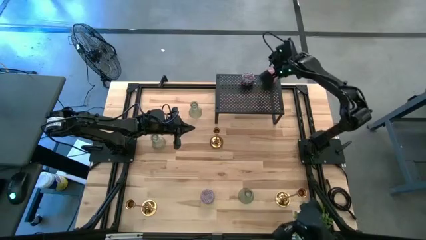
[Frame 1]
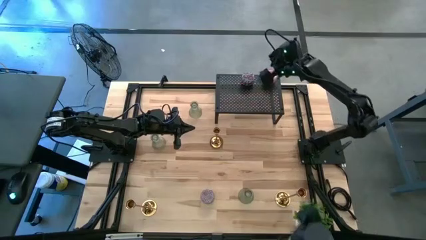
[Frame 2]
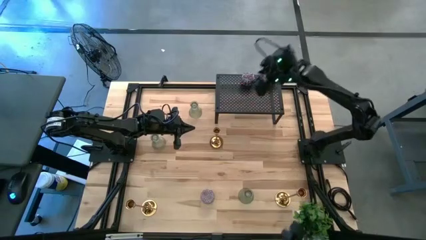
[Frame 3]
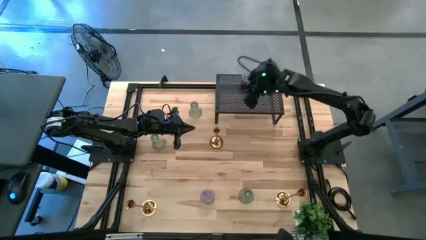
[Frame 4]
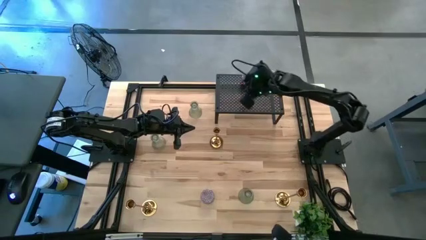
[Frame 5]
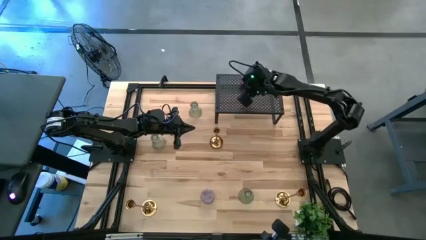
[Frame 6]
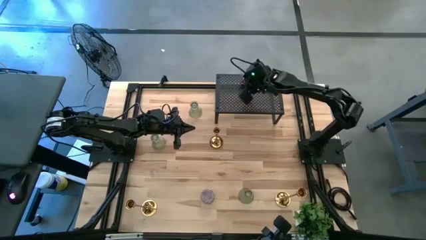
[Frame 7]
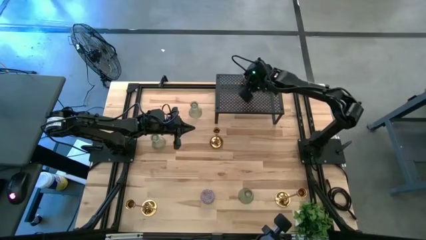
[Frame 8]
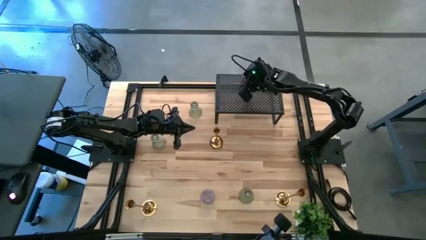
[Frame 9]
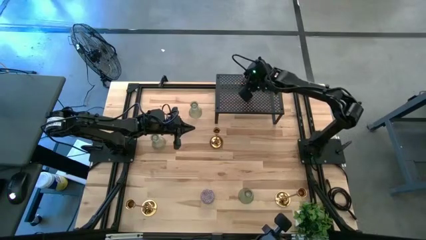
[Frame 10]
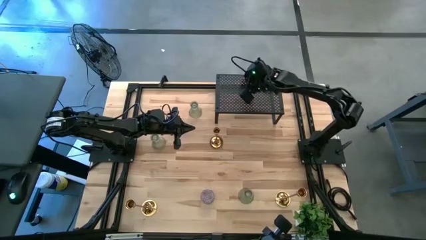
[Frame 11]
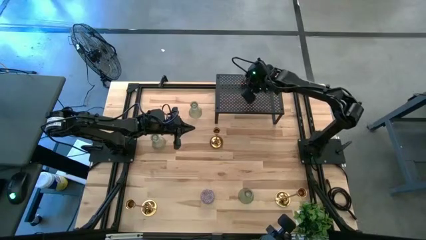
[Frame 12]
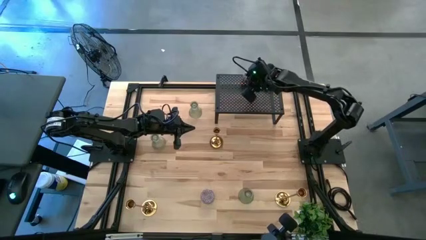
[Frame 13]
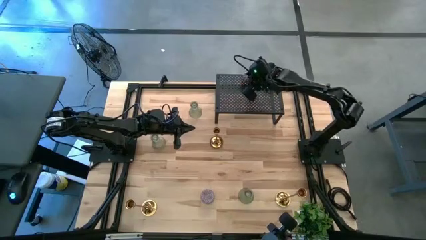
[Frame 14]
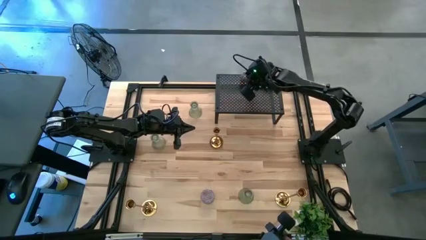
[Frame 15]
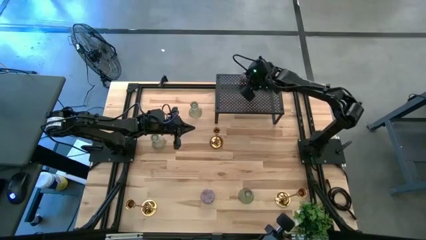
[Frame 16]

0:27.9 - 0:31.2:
Task: Pick & Place candle stick holders
Adjust the black patterned candle

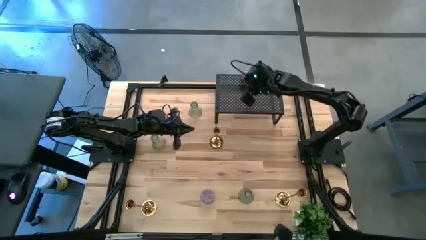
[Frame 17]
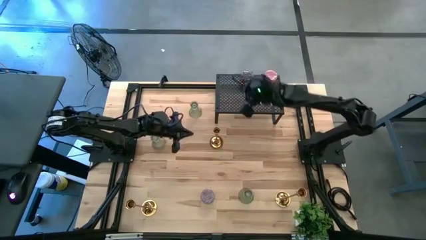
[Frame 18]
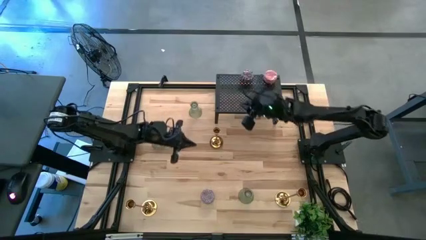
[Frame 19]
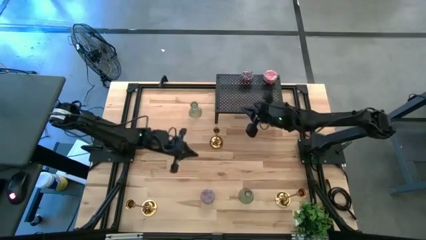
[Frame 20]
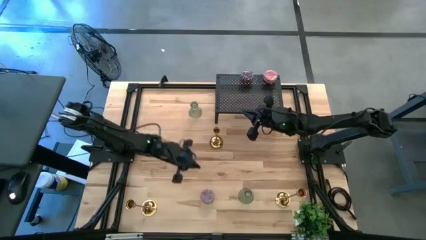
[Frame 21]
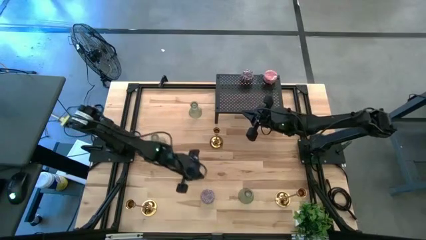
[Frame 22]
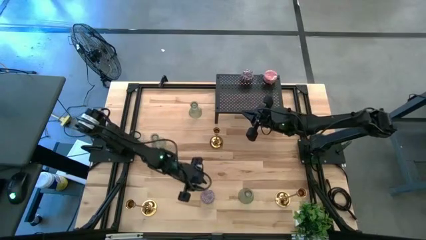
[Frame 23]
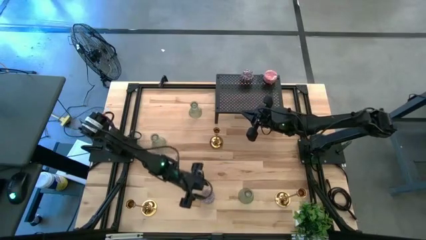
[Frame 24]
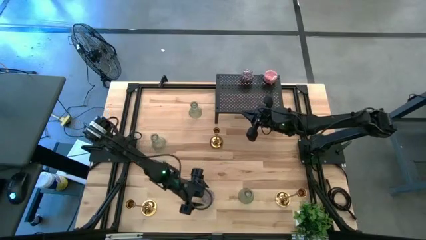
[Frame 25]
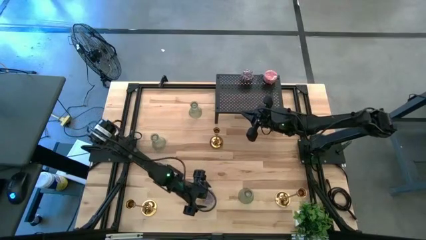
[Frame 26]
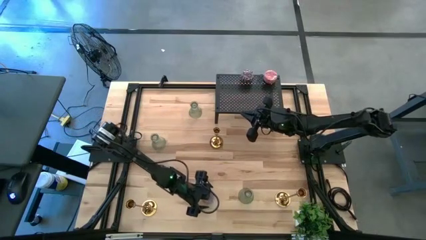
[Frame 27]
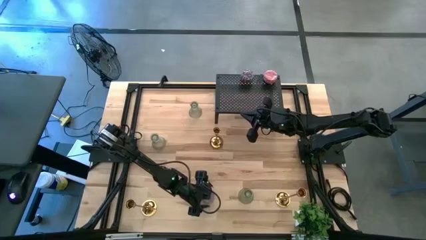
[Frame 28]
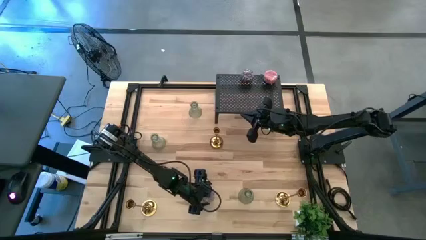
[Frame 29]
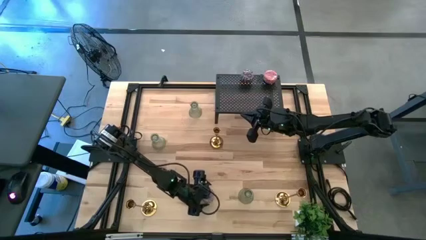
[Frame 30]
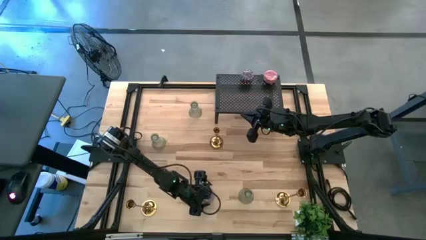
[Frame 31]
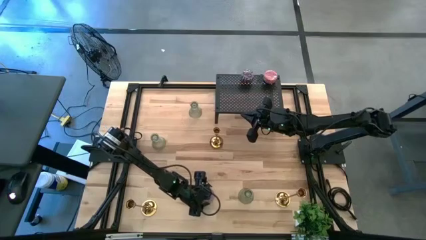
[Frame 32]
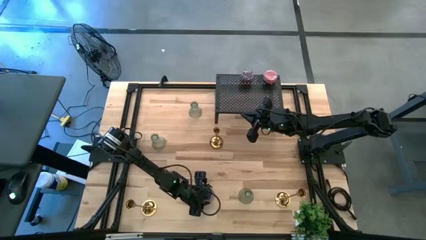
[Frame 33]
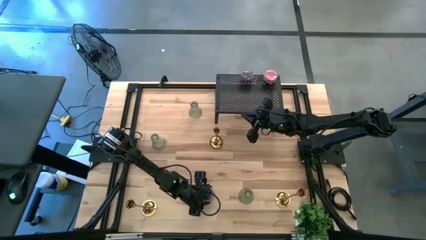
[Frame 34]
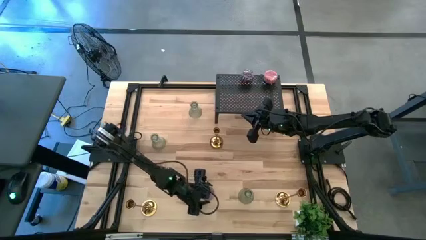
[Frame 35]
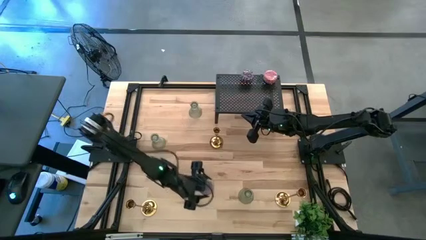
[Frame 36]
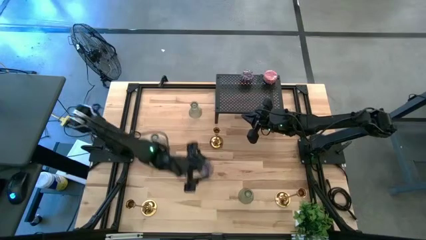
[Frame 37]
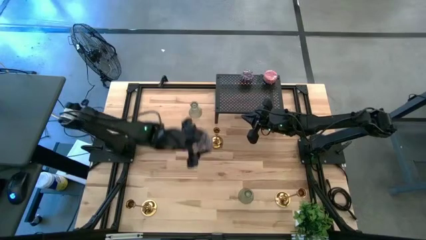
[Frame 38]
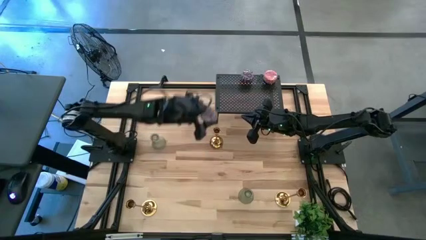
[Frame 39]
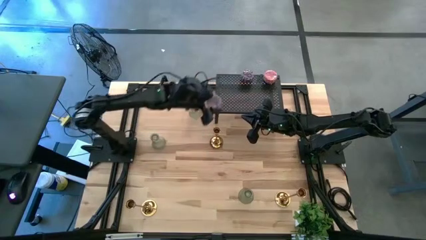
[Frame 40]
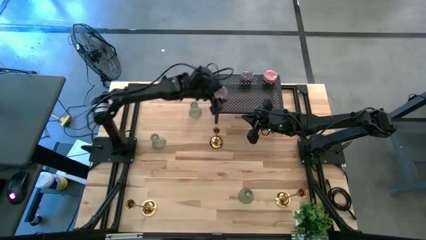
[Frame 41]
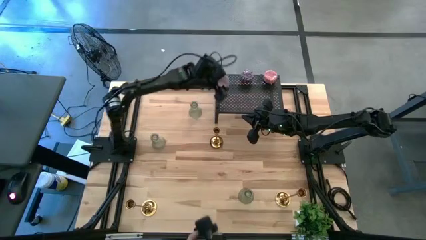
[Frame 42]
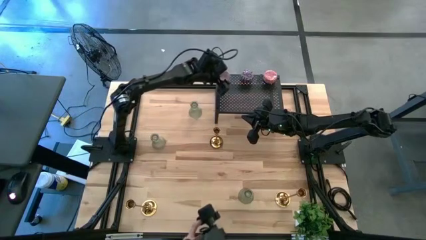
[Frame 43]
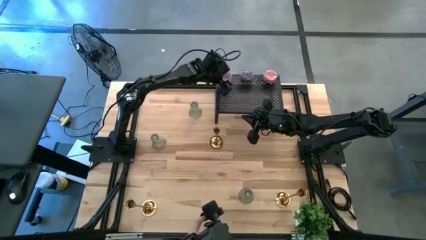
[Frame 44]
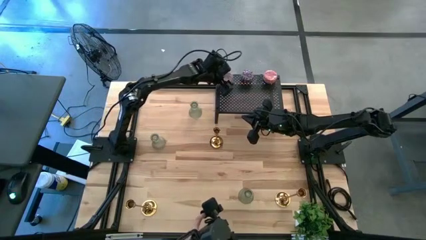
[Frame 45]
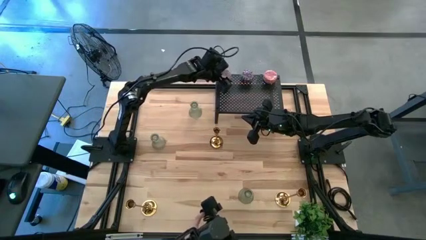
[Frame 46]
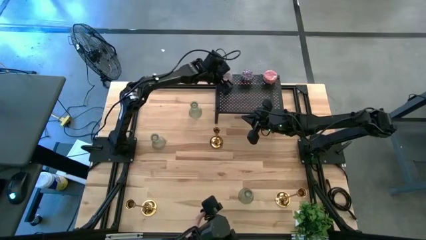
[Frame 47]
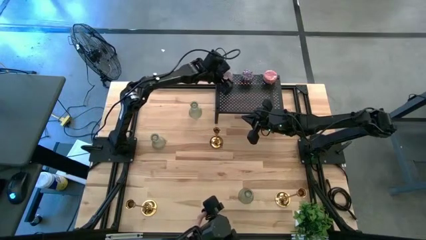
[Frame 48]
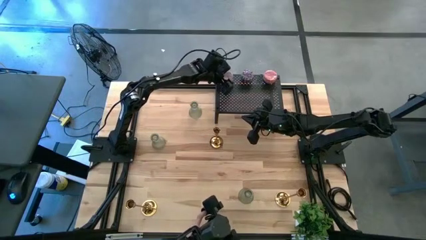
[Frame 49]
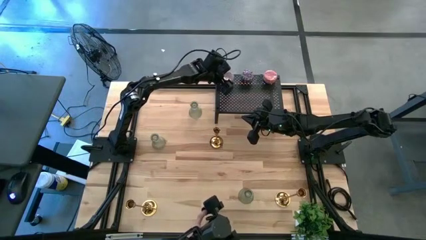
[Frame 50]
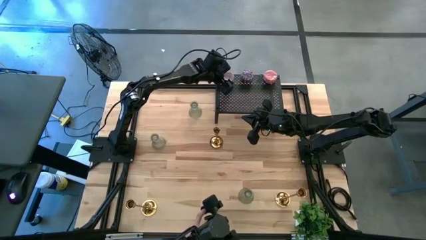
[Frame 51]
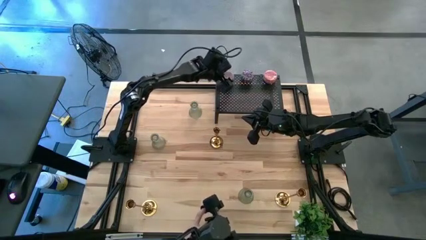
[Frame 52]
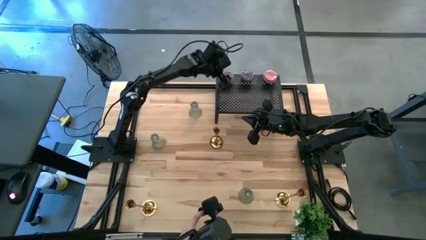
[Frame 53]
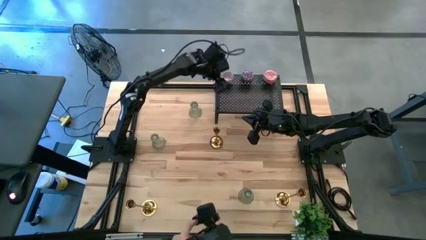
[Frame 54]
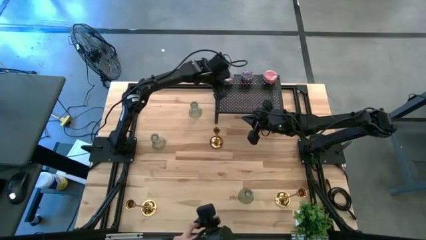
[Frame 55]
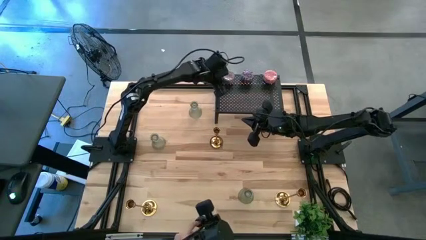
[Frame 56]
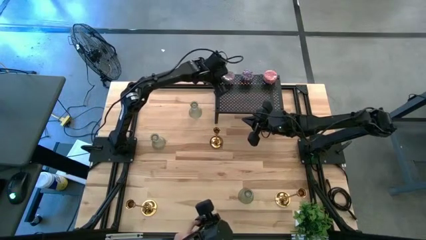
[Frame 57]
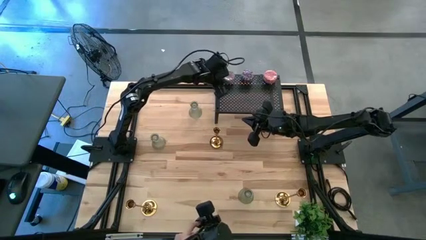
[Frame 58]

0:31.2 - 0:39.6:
Put the red patterned candle on the shelf

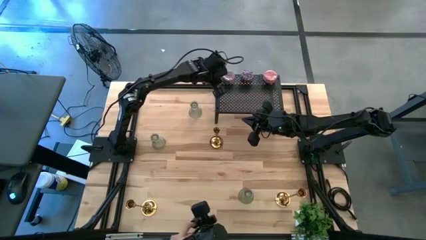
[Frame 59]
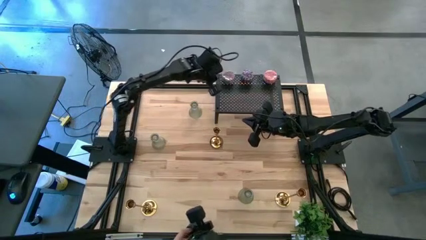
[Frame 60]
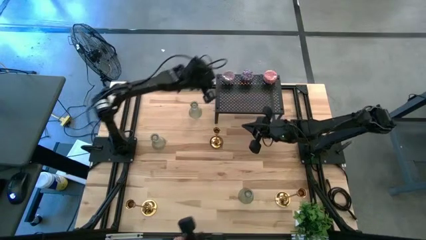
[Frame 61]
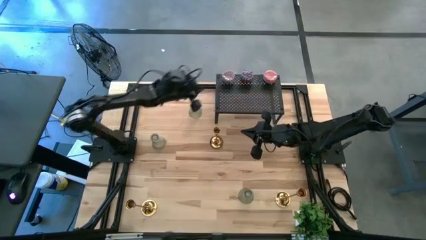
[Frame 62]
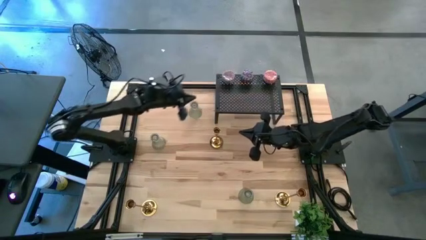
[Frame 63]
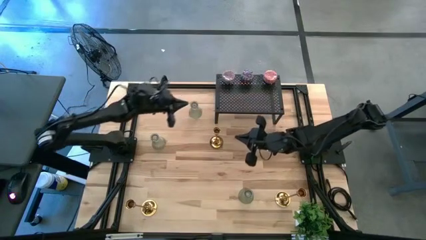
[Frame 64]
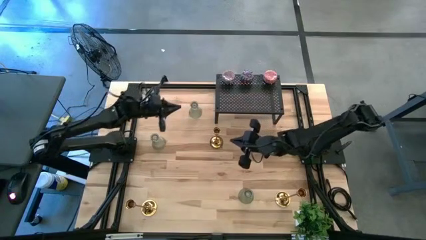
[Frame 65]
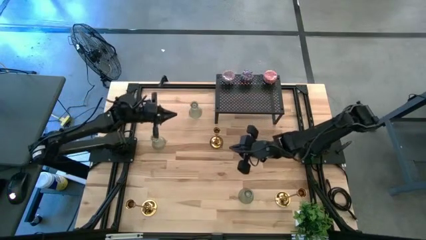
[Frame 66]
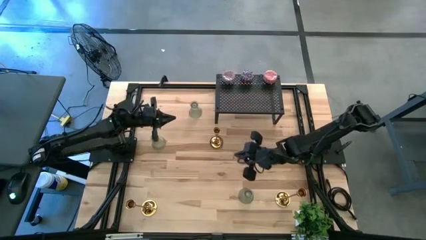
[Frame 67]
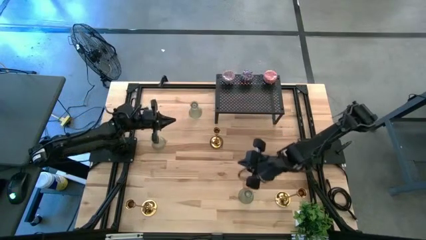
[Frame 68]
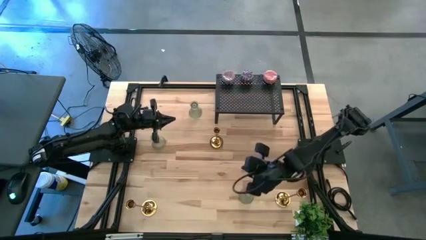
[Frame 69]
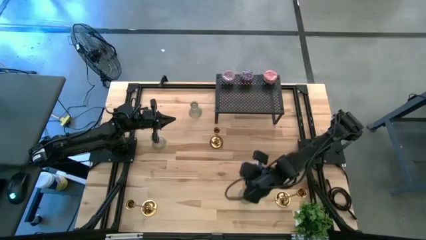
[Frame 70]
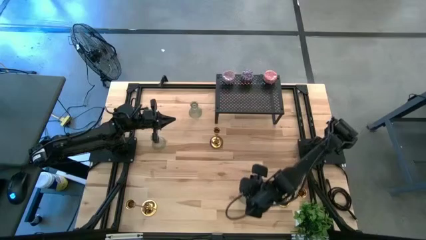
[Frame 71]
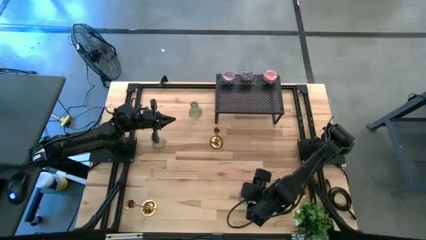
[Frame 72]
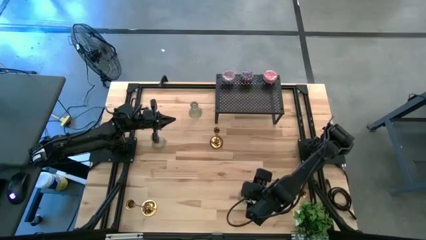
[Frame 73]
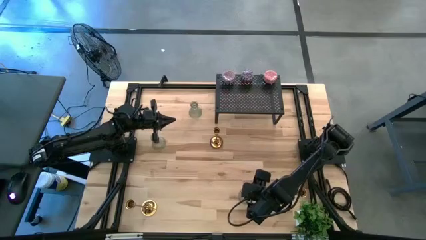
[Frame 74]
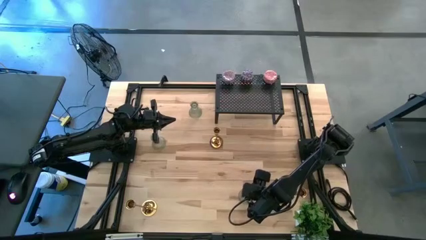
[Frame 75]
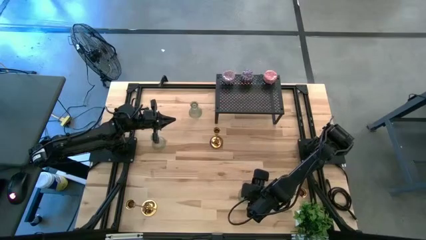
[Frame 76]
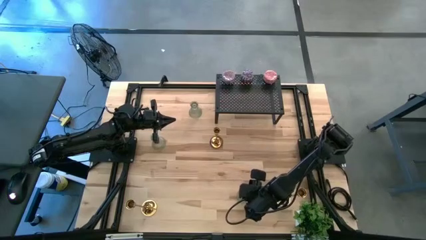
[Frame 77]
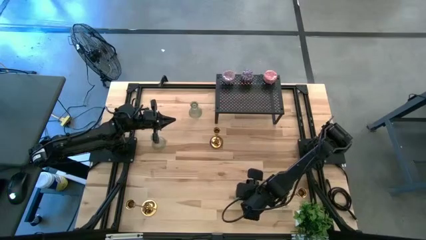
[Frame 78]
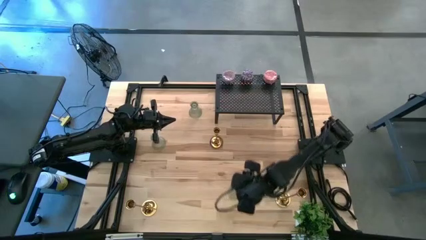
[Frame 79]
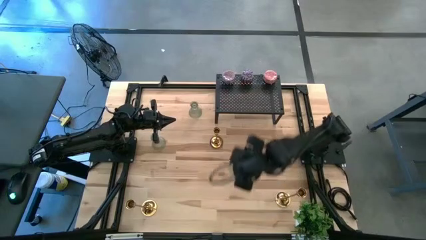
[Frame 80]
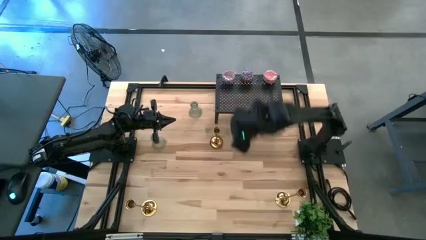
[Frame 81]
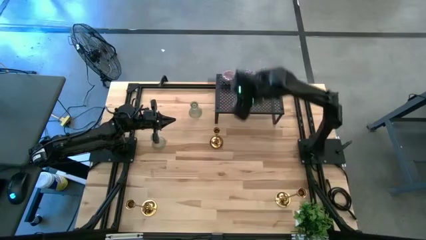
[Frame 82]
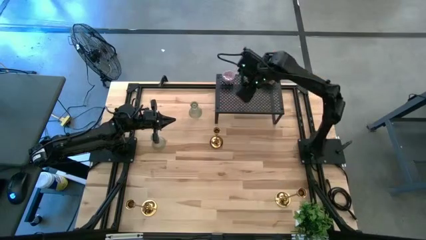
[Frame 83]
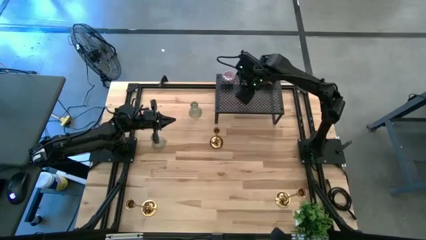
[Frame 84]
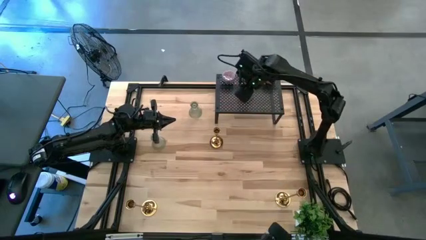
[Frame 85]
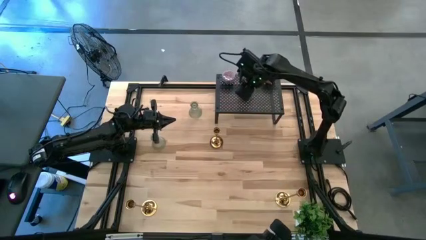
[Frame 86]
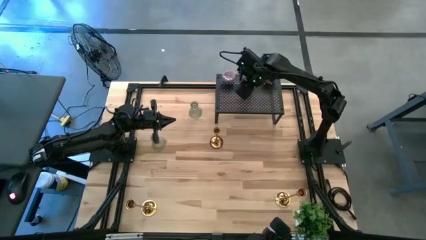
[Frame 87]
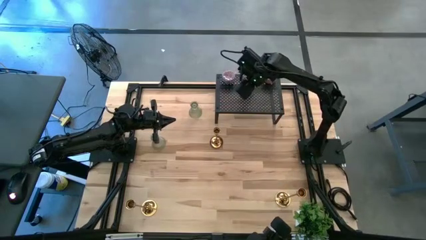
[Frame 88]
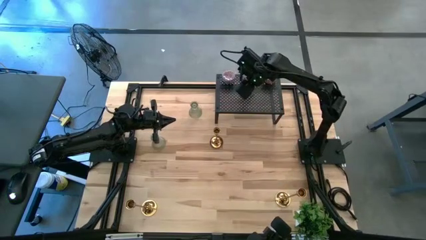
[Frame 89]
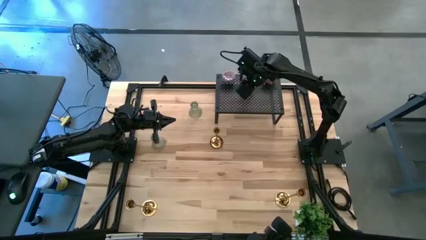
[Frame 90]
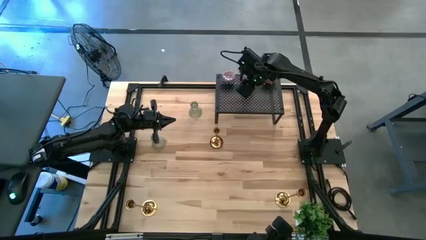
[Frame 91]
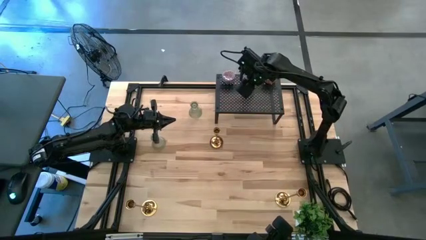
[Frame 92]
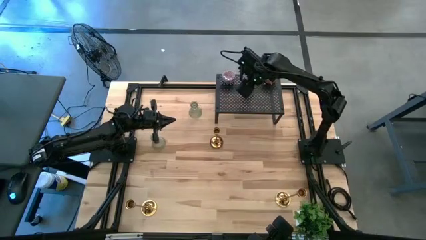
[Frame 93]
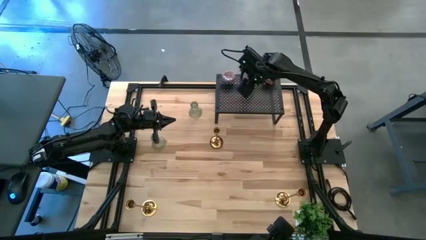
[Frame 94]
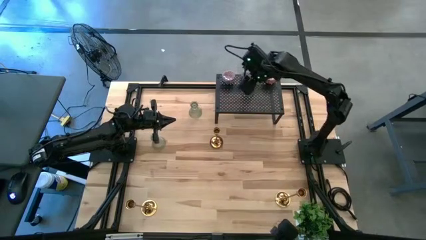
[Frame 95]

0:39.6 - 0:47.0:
Put the bottom glass candle holders on the shelf
